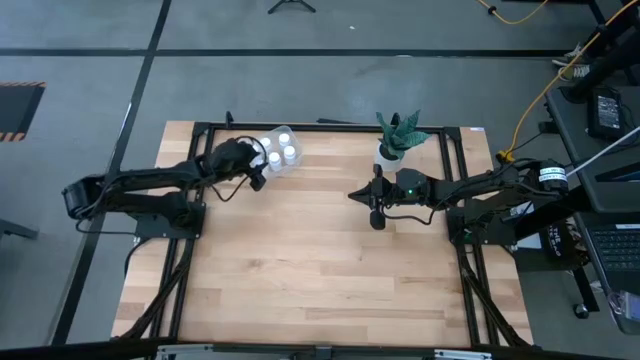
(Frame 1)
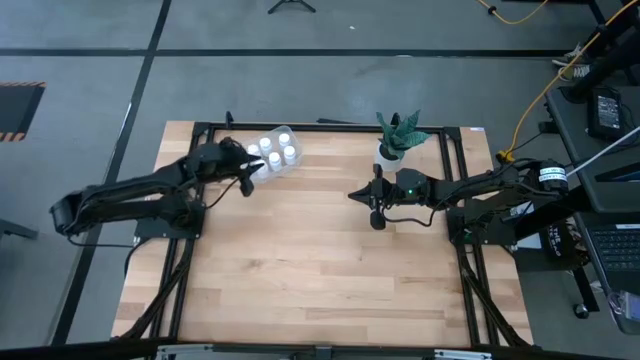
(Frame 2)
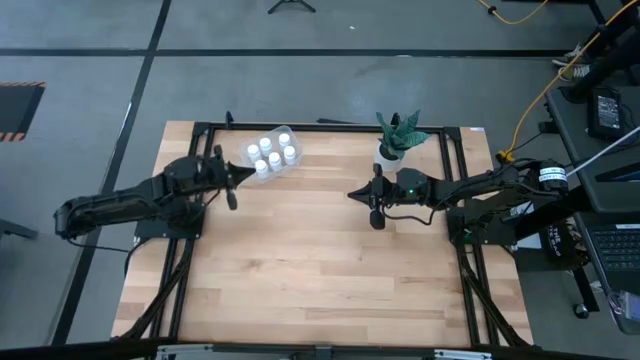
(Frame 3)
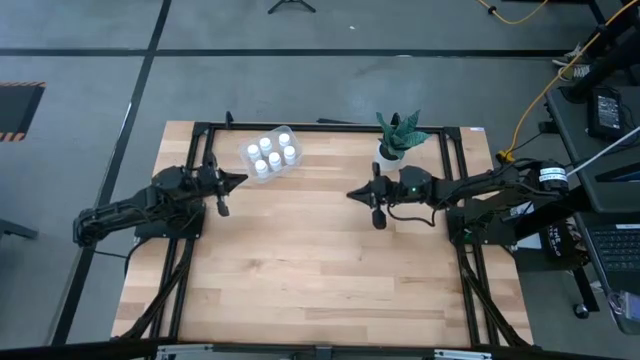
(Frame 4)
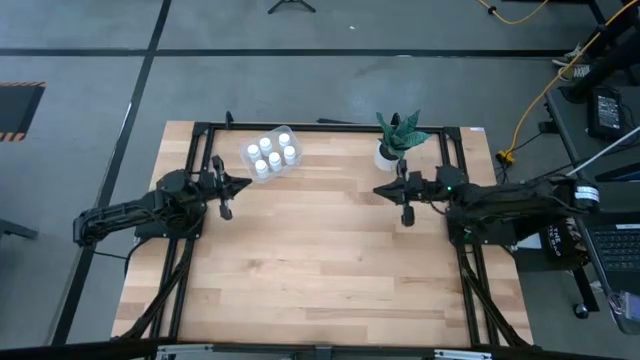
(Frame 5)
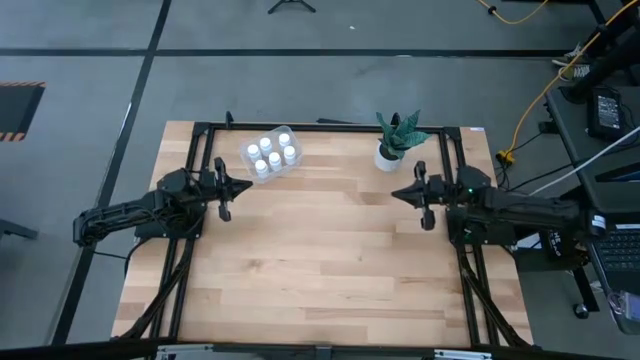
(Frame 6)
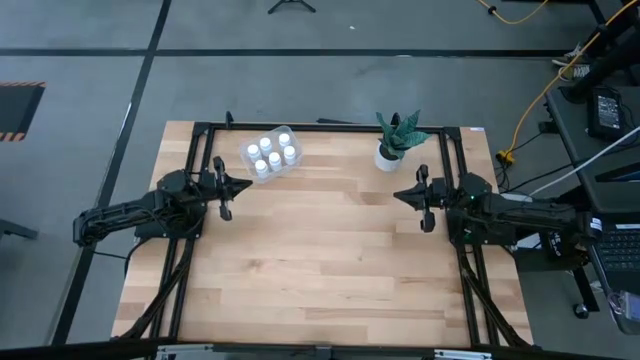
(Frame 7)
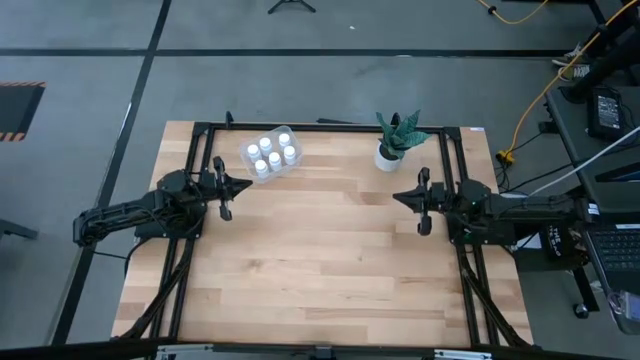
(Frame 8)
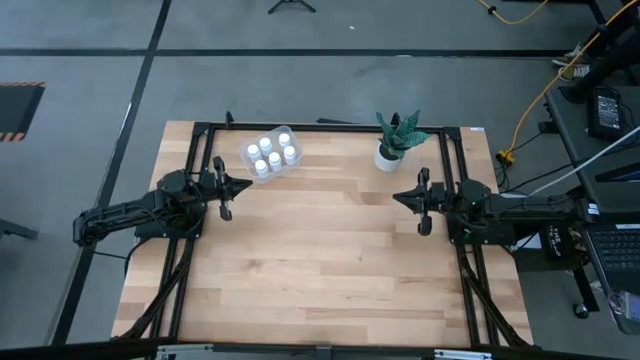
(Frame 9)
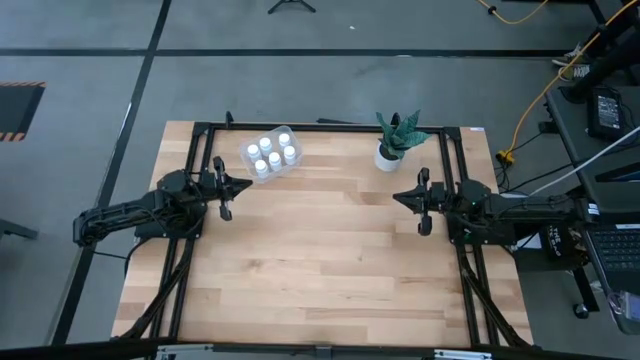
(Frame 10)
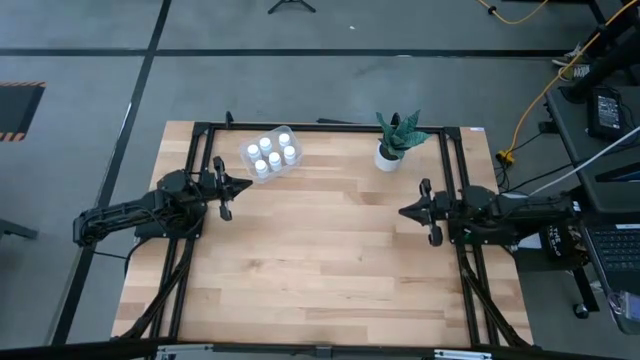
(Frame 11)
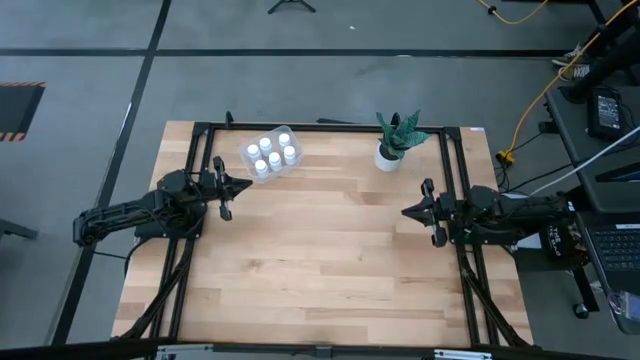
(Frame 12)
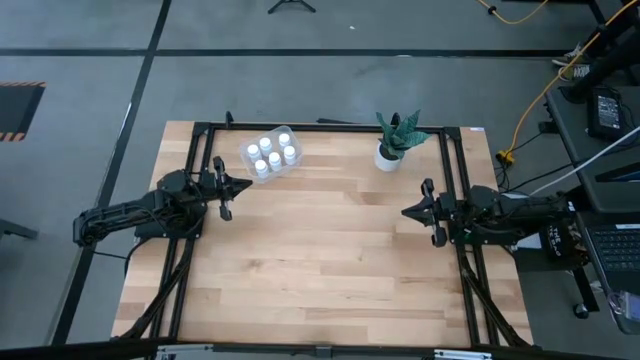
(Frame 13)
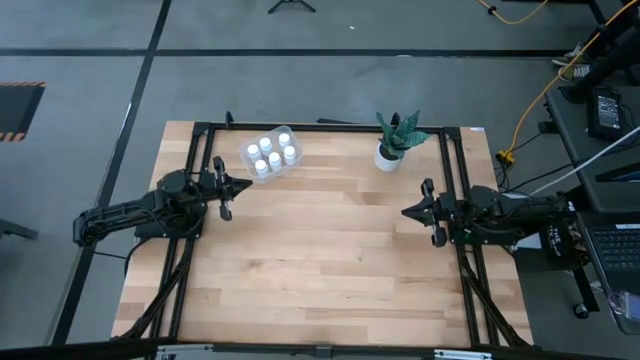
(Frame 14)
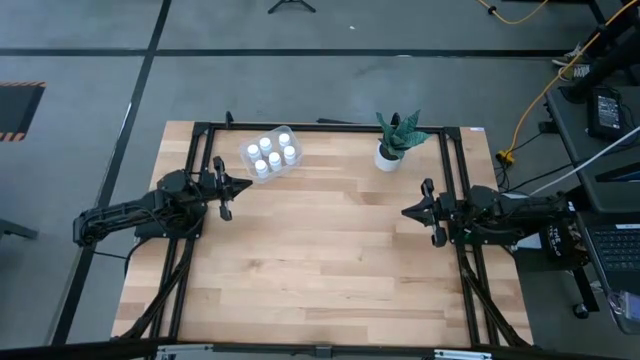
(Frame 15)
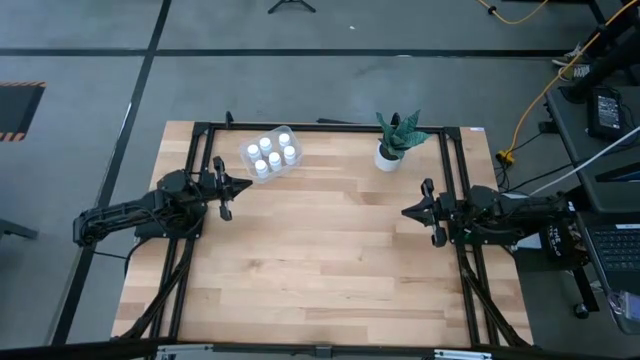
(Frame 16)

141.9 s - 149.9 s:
Task: Pick and place pill bottles into a basket
Return to Home Position

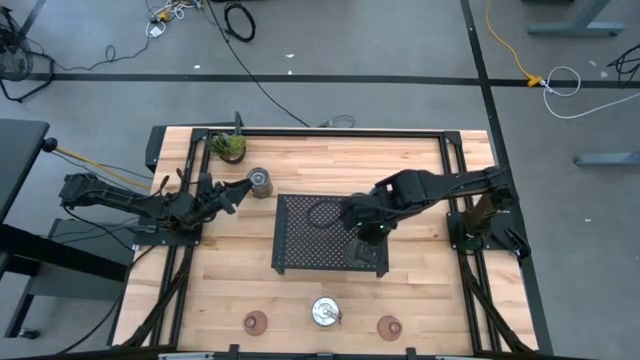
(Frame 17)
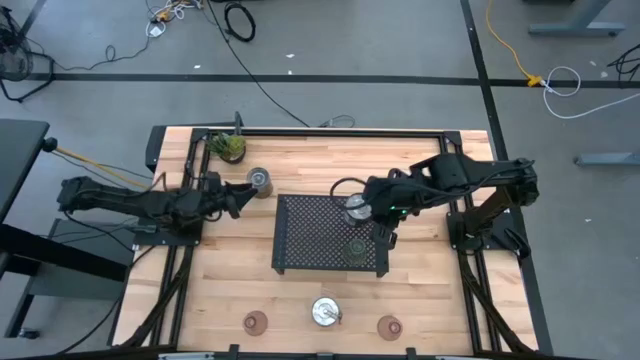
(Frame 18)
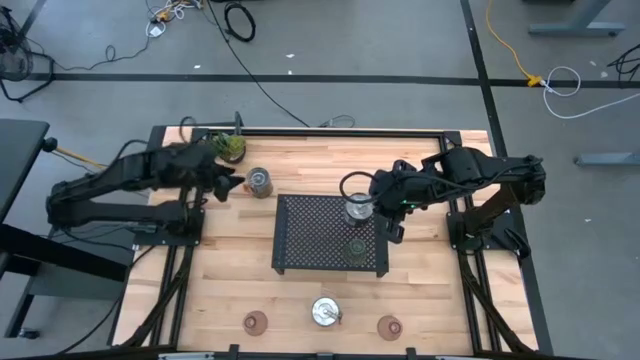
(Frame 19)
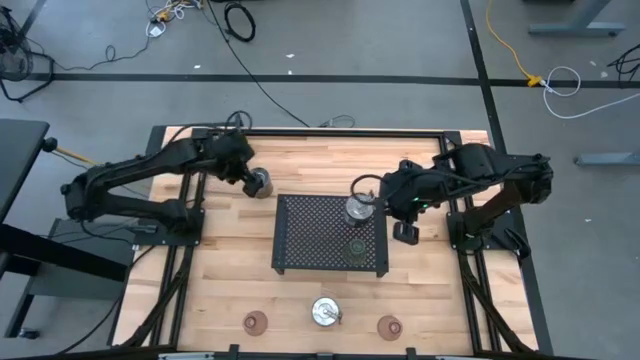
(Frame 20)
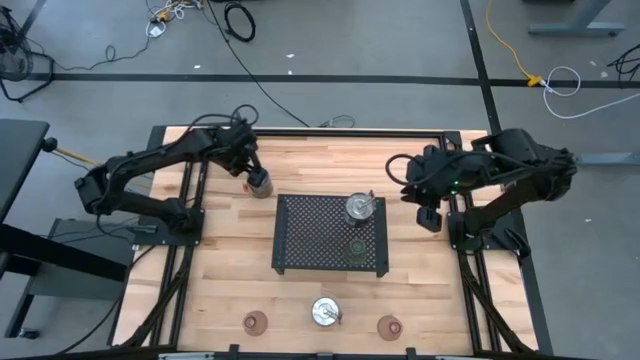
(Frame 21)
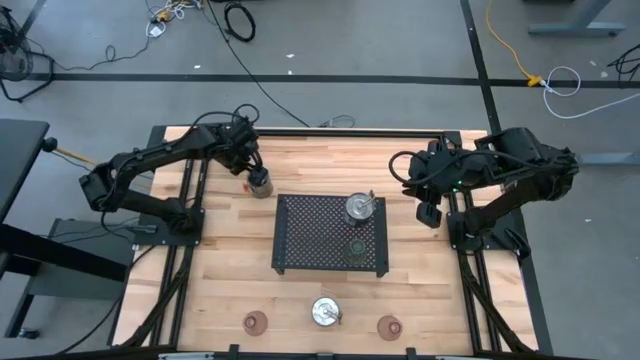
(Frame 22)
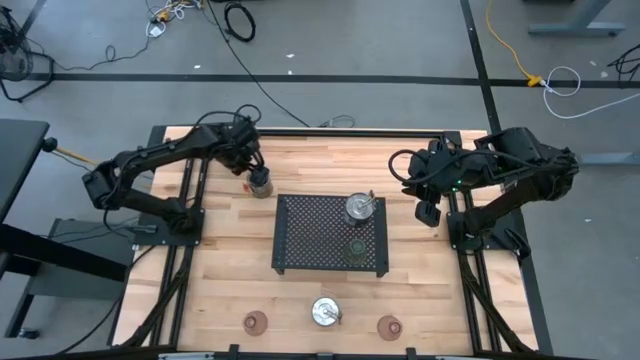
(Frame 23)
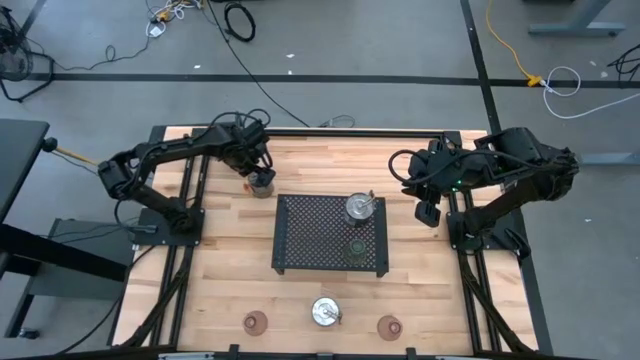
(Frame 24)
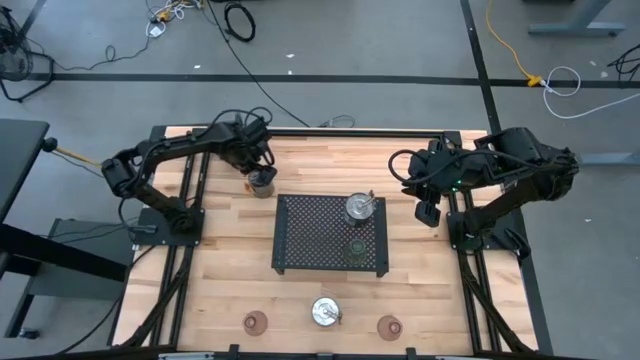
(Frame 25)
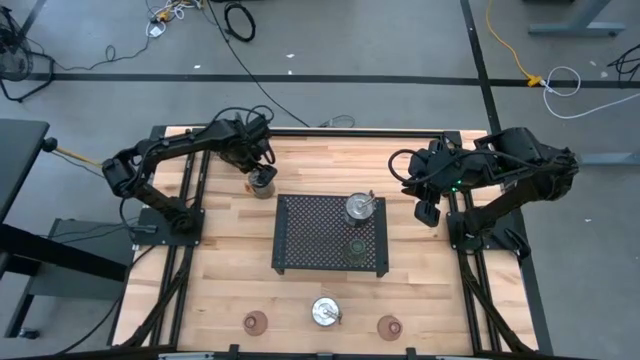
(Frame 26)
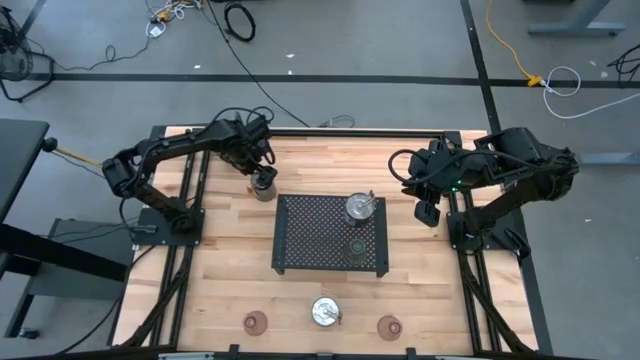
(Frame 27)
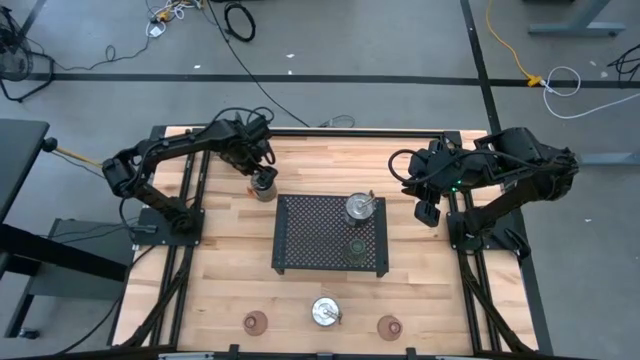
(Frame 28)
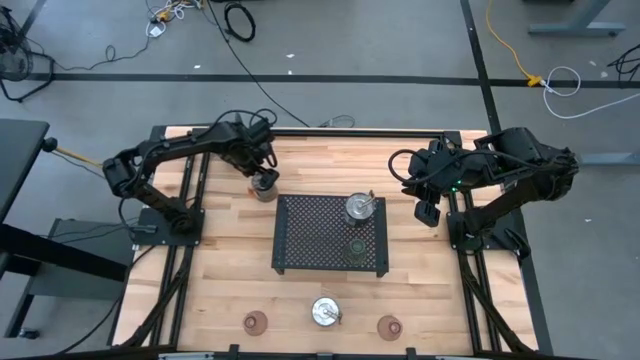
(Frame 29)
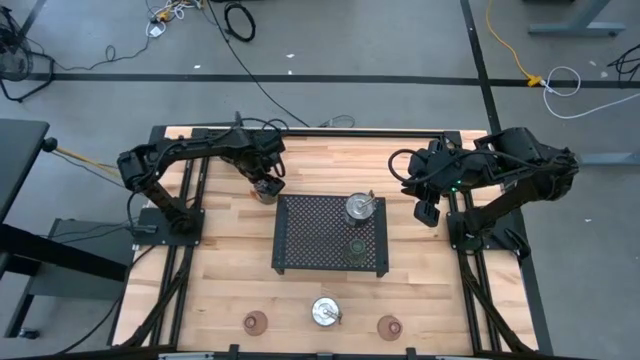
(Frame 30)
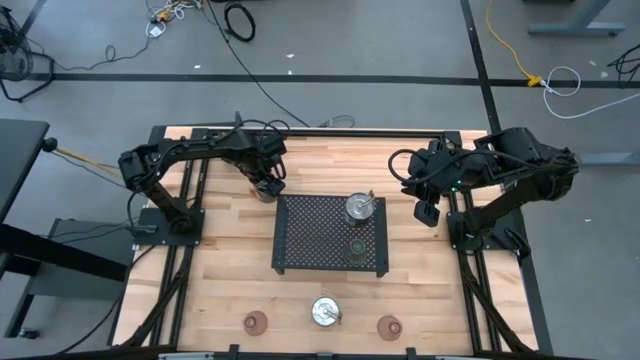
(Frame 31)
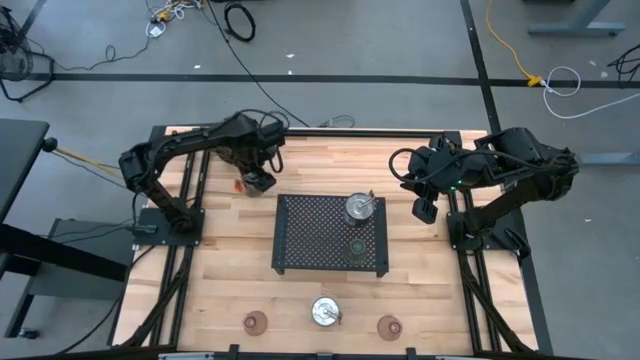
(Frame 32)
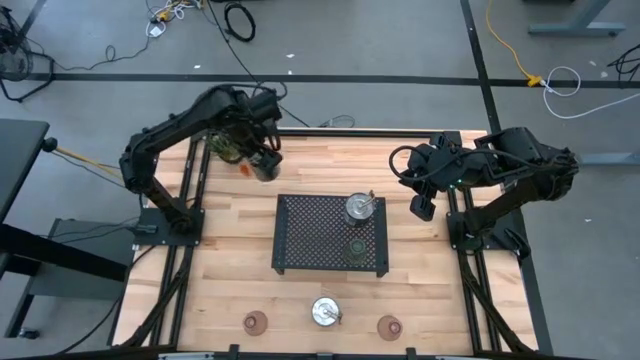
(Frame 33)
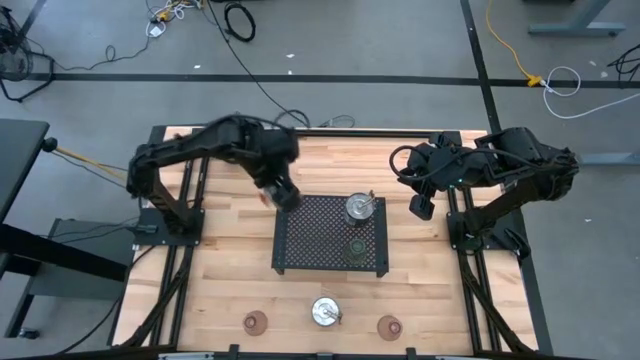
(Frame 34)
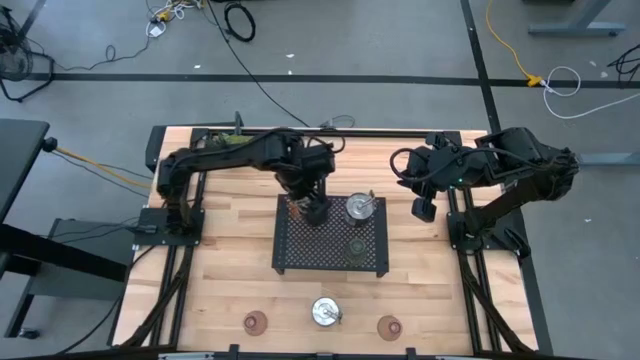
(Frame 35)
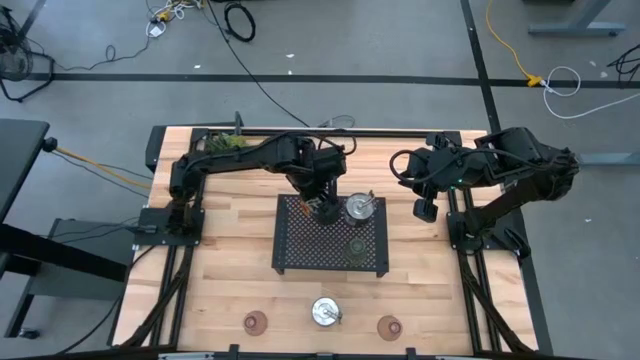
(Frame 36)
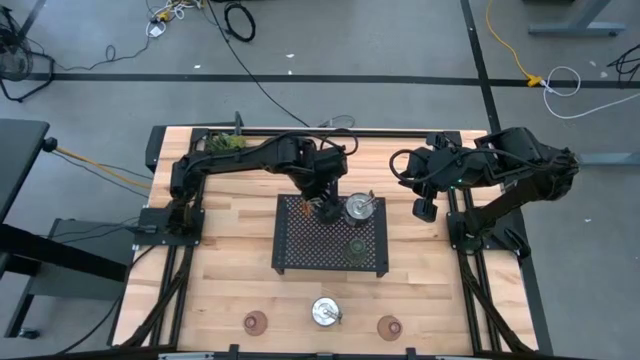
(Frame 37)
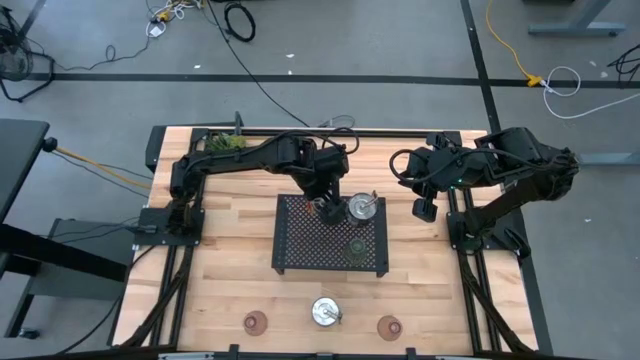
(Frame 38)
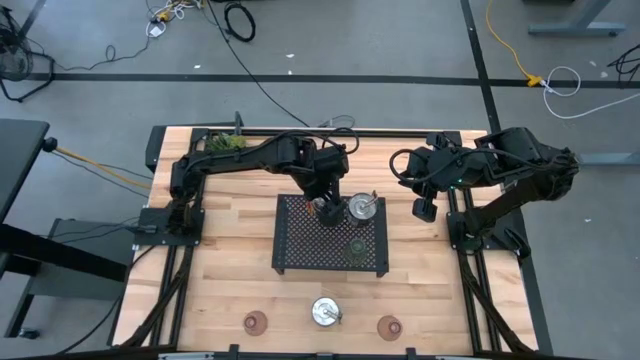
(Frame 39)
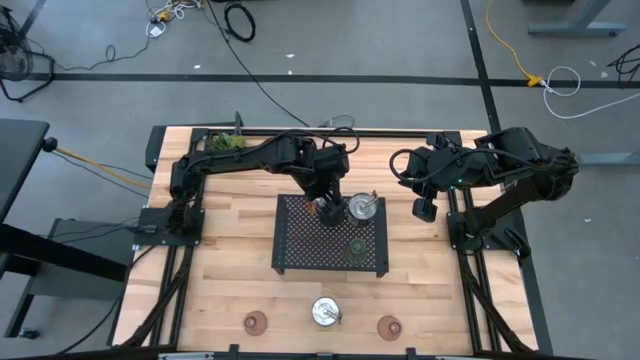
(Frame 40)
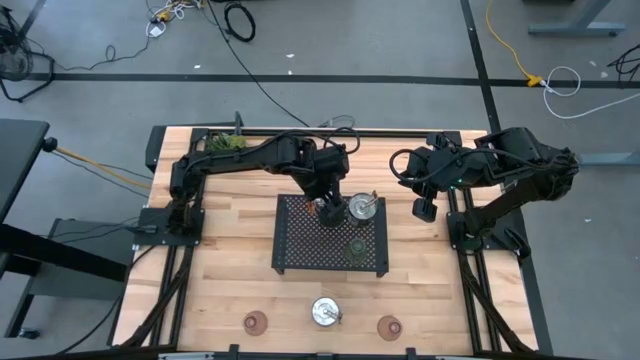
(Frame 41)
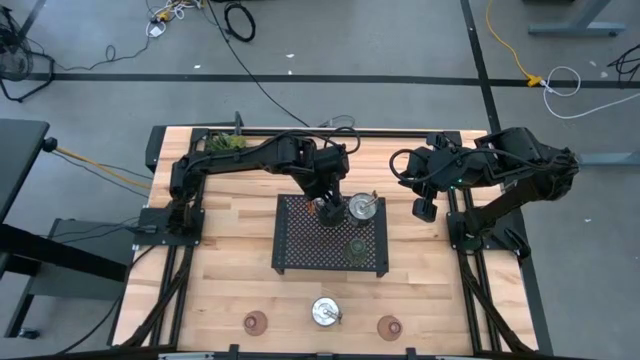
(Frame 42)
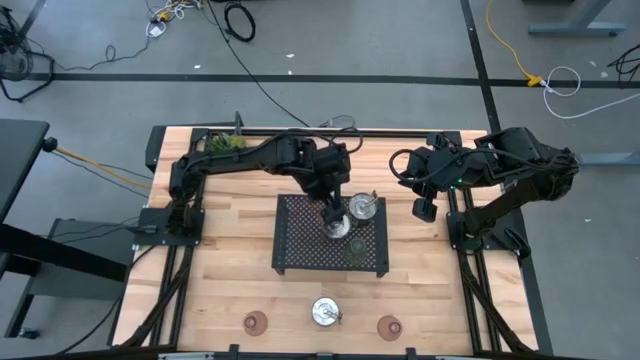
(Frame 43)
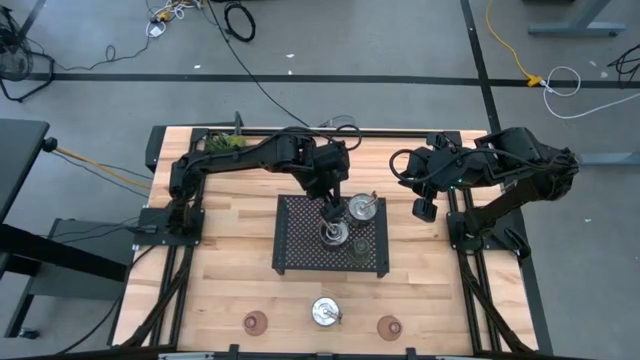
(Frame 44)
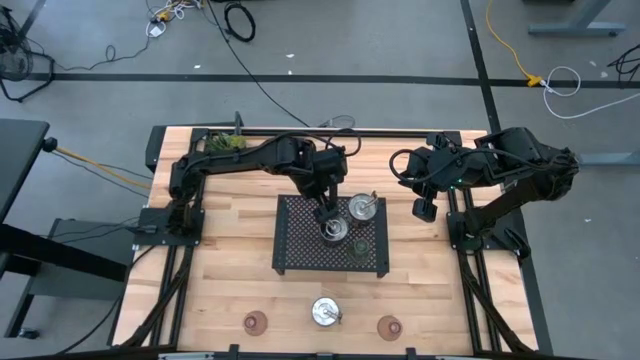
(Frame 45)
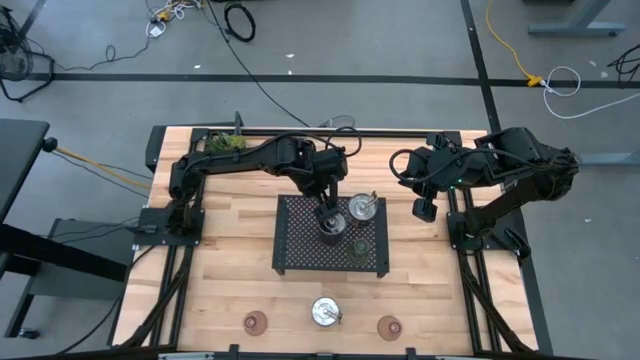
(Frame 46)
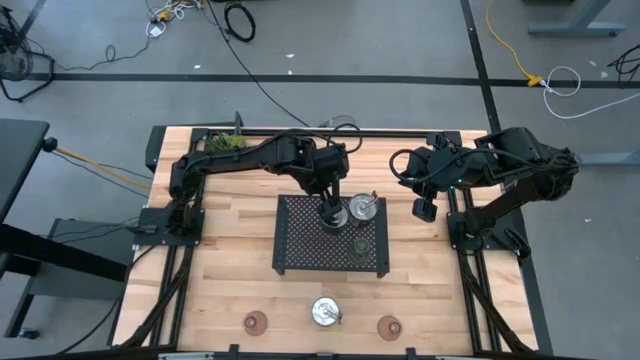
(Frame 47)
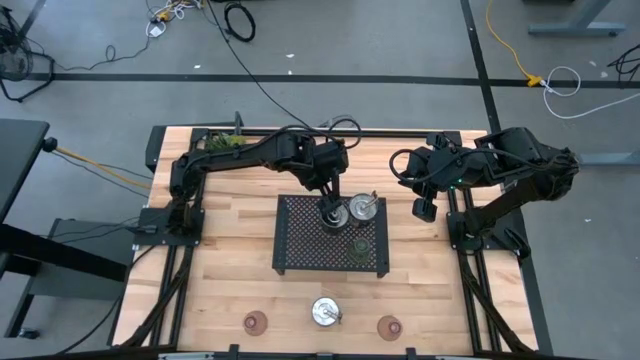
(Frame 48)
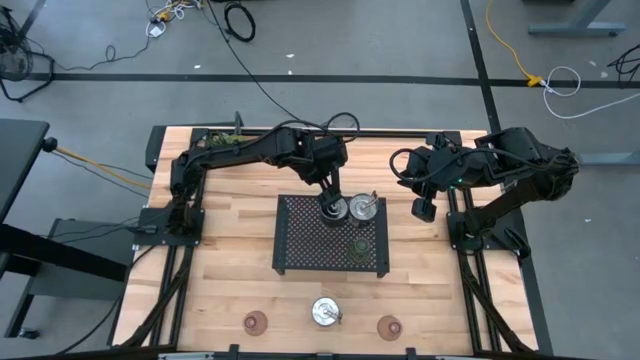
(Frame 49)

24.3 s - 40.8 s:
Task: Pick & Place candle stick holders
Put the silver scented candle on the shelf aligned with the silver scented candle
